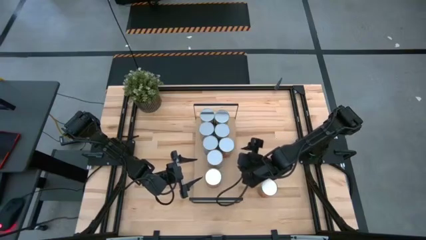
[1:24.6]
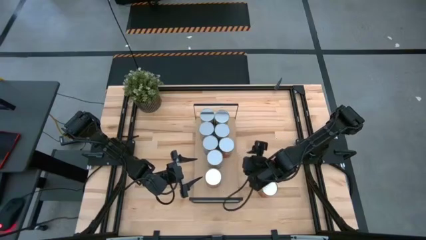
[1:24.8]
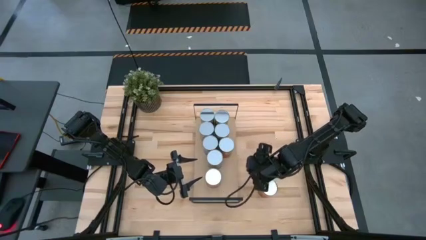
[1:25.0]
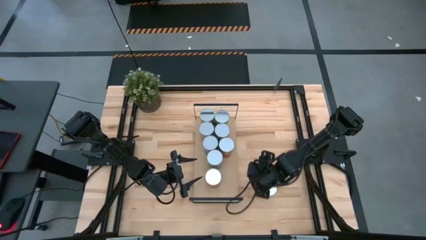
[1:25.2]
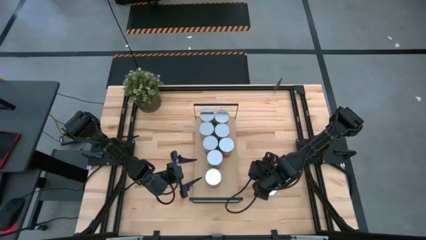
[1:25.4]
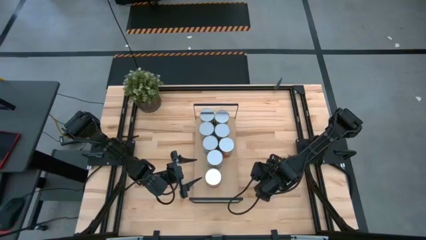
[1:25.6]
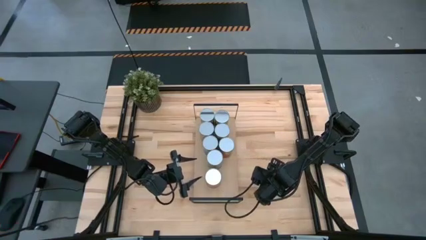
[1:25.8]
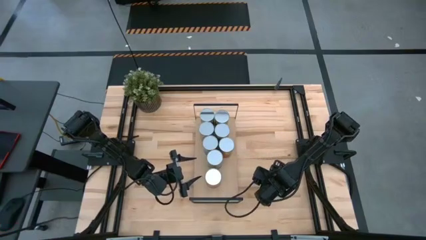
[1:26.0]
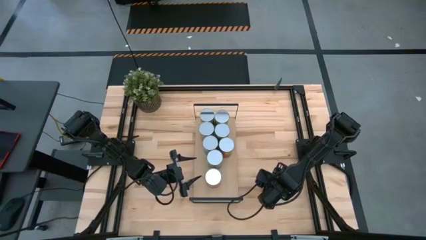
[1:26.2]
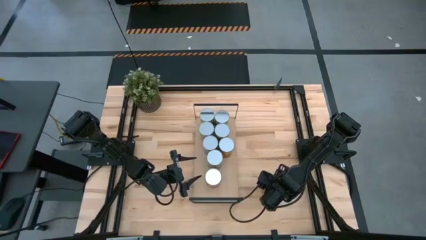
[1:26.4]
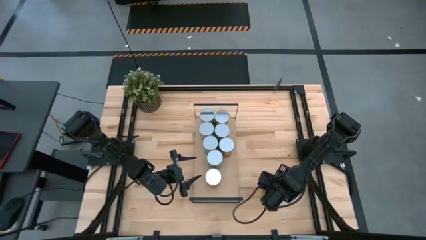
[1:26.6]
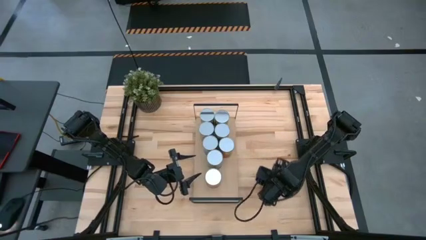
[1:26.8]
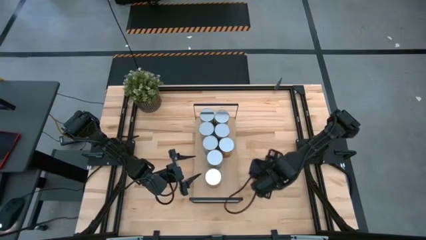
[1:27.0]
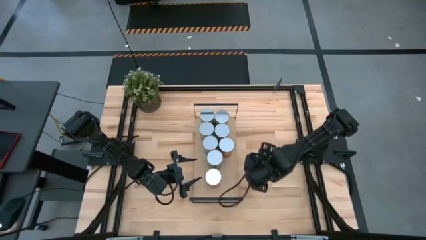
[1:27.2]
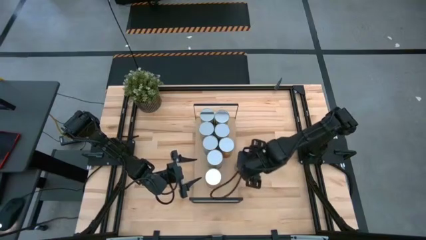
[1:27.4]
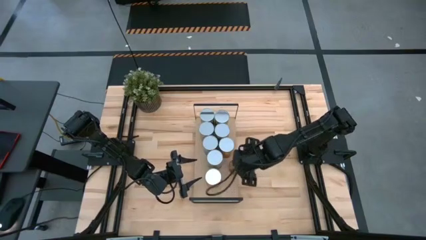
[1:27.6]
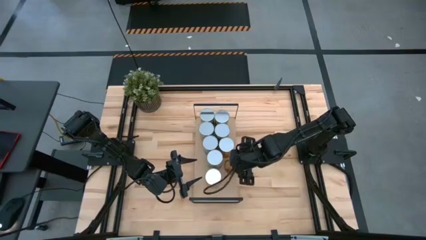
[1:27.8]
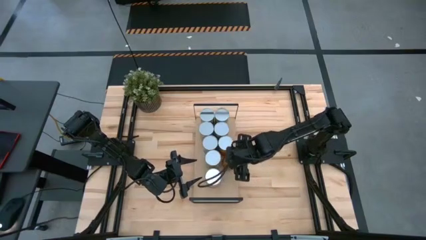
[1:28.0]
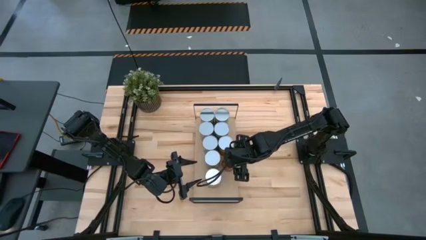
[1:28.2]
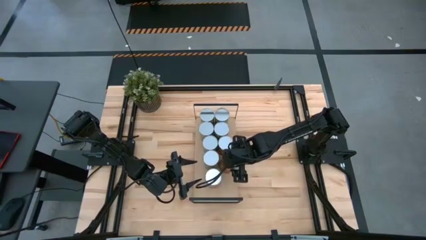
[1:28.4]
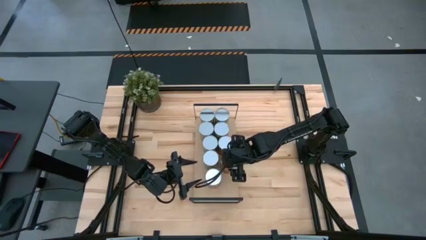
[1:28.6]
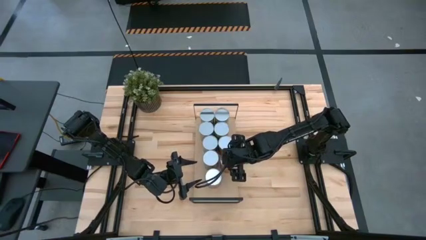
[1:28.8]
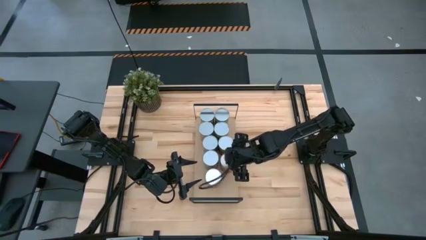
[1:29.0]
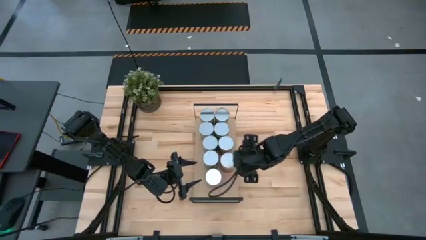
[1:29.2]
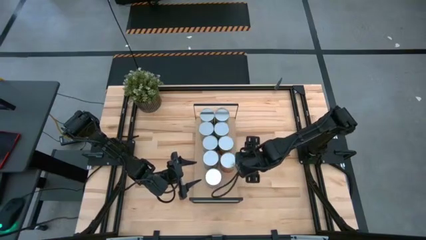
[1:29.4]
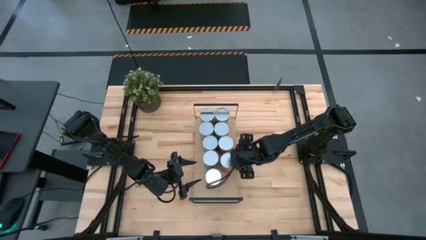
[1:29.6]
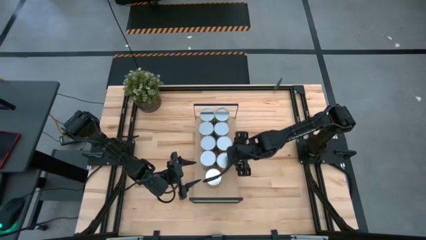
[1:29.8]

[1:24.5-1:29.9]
Task: Pick and place cans onto a shelf
Put the canned pineapple on the shelf

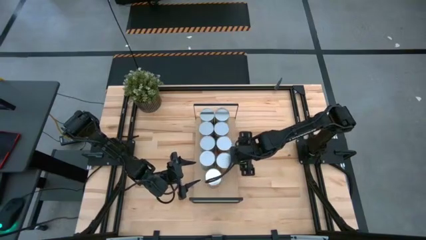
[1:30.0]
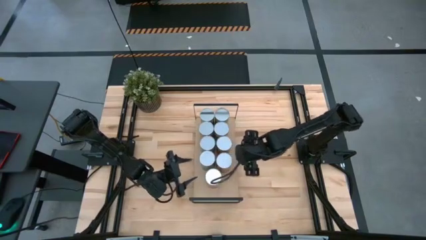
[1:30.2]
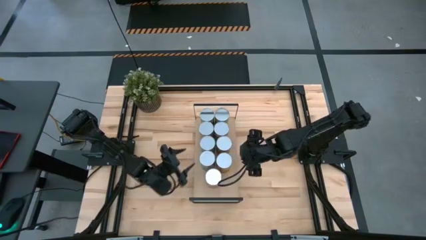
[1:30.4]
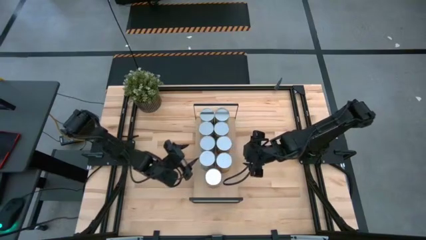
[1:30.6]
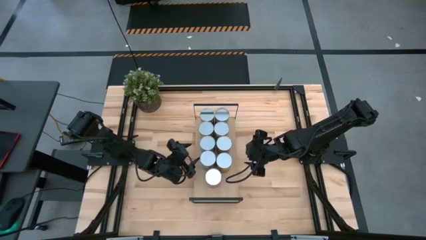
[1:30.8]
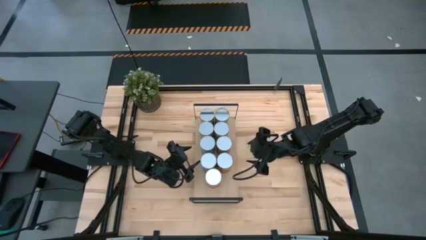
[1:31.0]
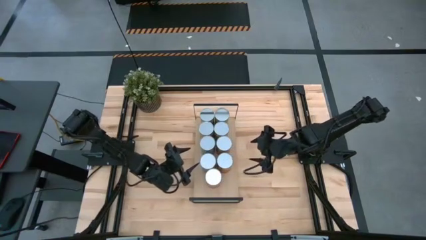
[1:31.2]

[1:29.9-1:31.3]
Adjust the canned tomatoes on the shelf

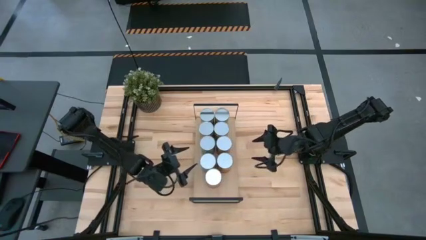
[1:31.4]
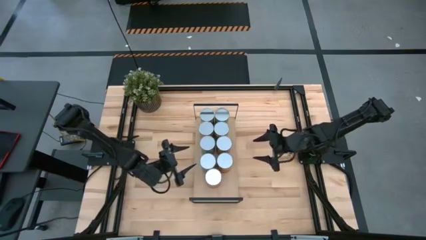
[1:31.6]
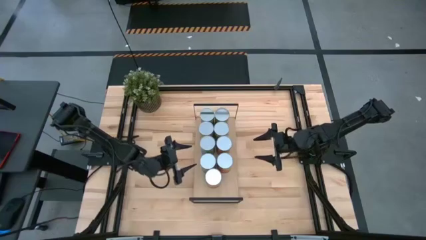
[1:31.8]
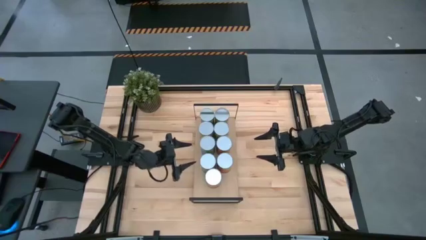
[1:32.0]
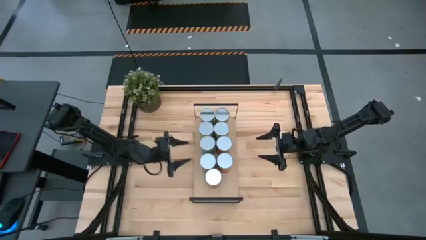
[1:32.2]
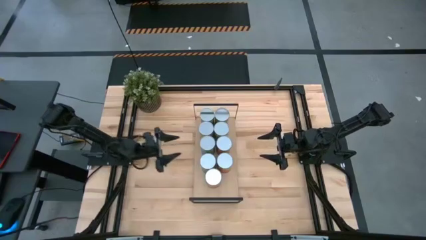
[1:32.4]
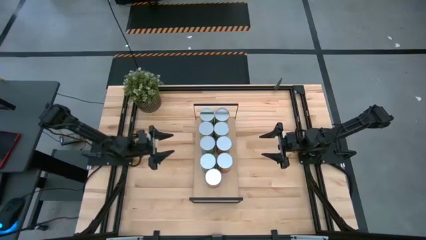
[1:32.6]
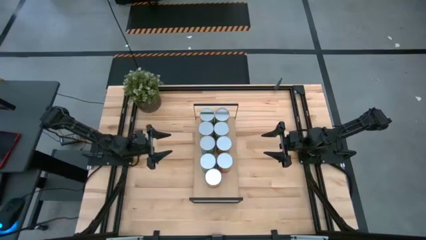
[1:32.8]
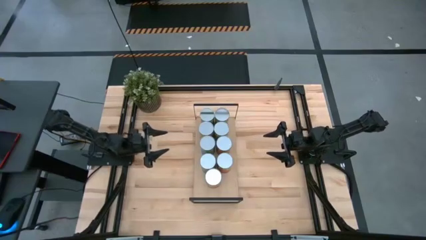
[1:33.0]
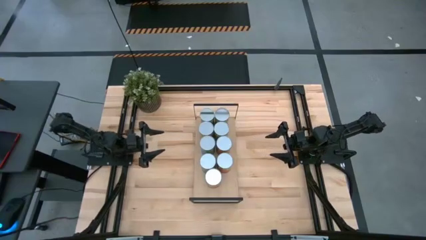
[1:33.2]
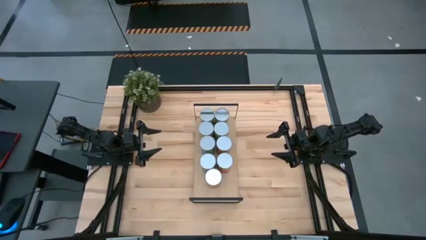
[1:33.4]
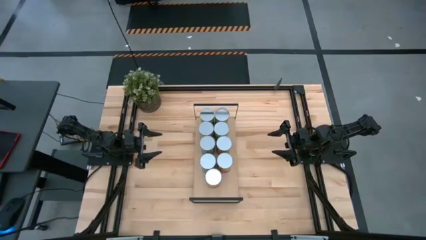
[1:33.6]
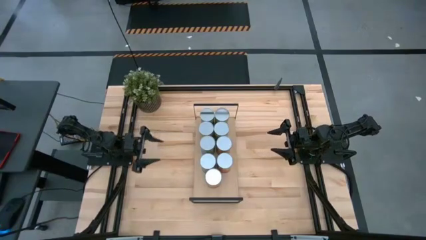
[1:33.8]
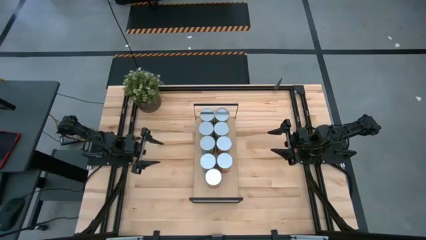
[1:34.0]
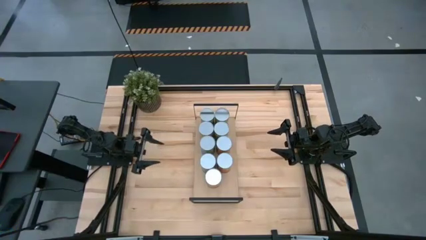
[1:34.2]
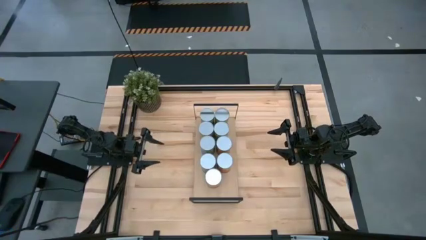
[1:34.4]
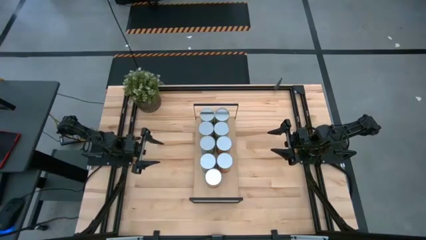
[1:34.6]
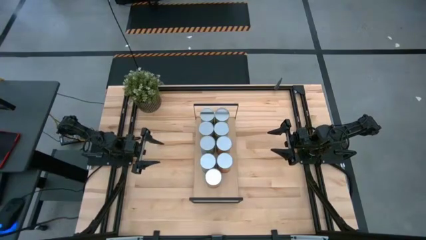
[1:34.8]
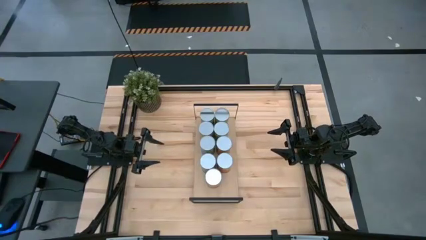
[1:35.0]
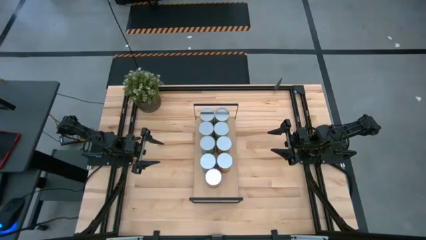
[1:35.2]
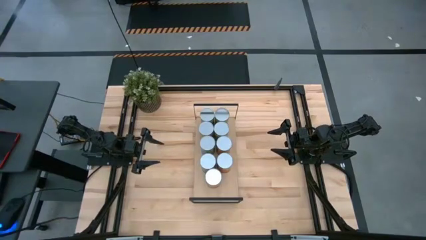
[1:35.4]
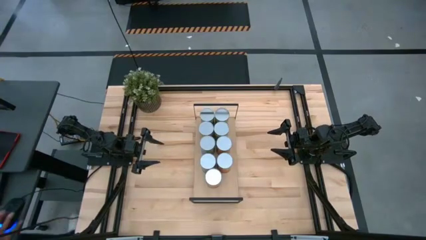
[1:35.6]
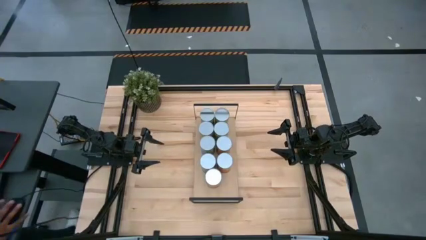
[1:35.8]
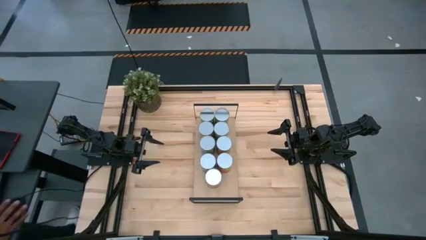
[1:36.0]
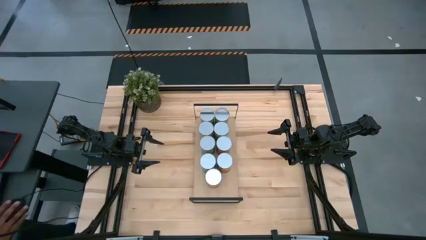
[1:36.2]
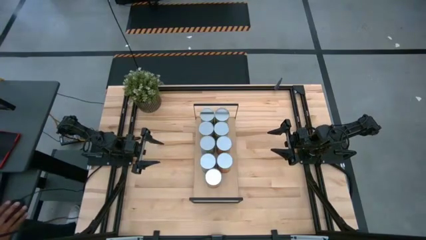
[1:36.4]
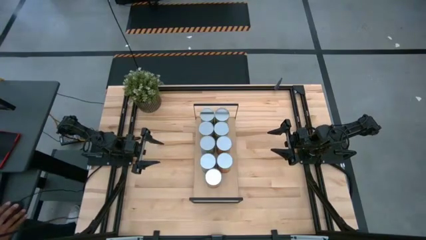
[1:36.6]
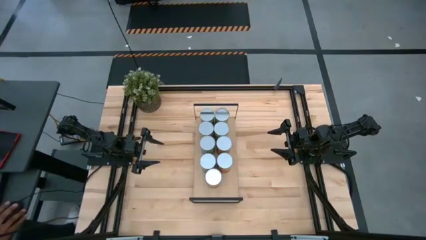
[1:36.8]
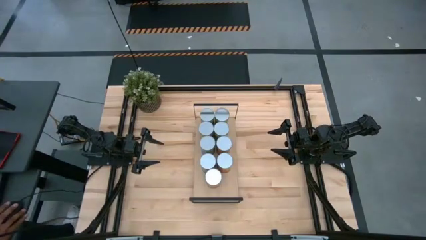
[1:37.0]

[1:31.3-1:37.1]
Return to Home Position

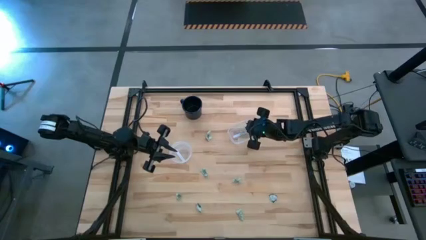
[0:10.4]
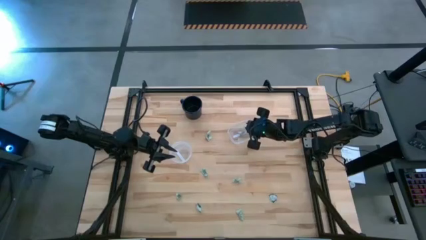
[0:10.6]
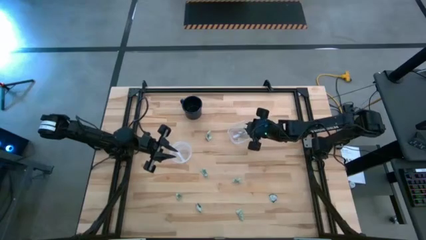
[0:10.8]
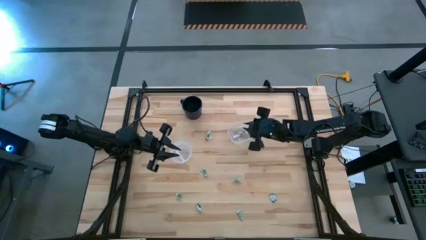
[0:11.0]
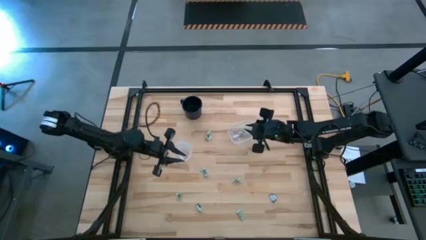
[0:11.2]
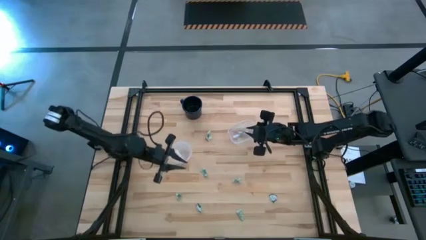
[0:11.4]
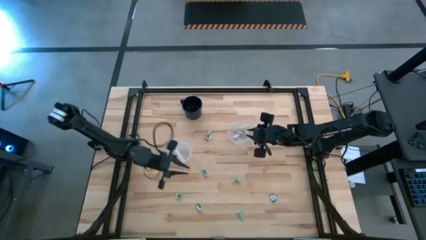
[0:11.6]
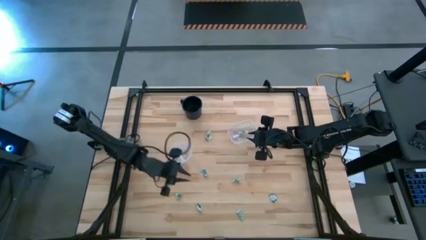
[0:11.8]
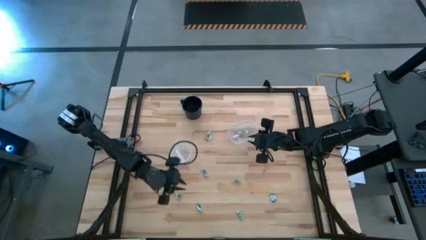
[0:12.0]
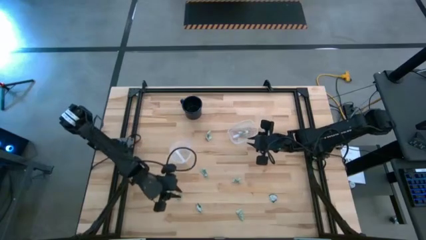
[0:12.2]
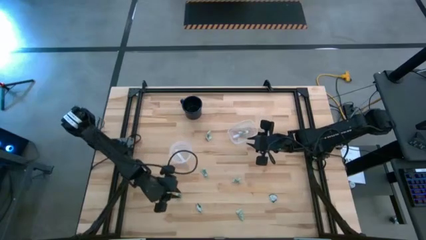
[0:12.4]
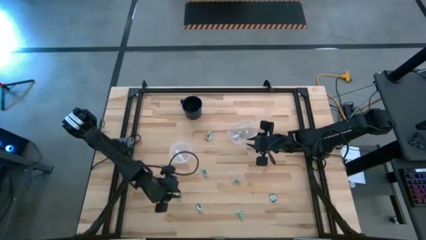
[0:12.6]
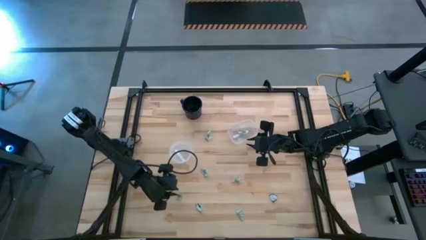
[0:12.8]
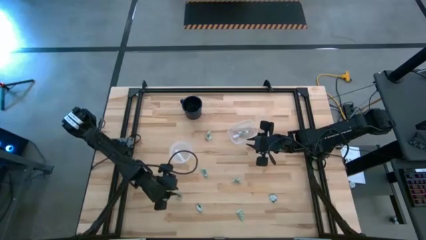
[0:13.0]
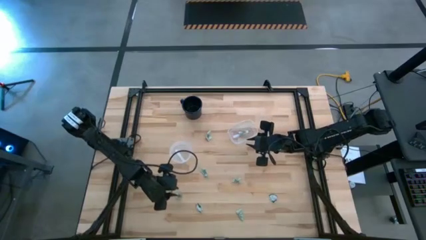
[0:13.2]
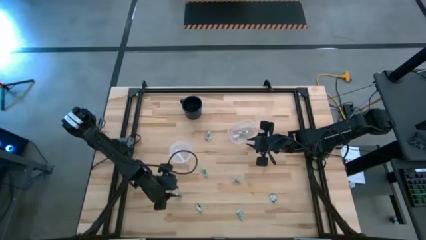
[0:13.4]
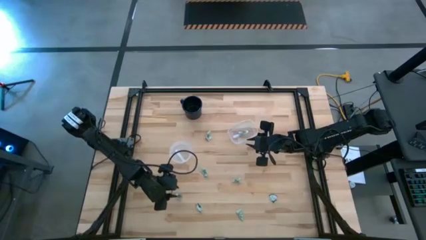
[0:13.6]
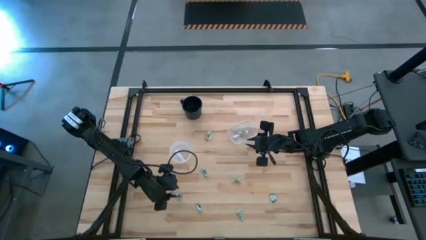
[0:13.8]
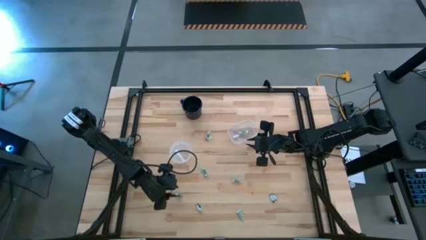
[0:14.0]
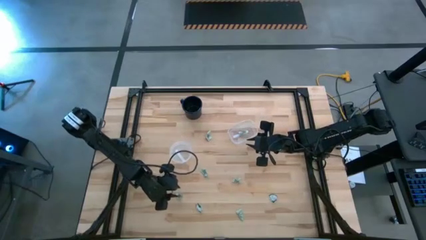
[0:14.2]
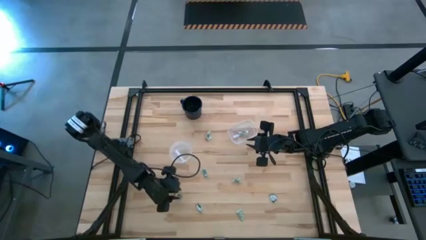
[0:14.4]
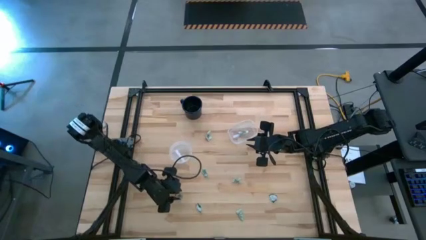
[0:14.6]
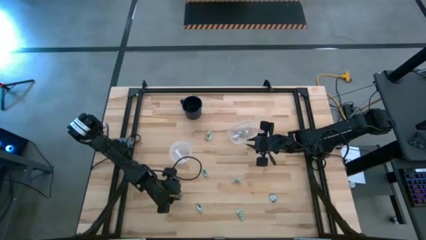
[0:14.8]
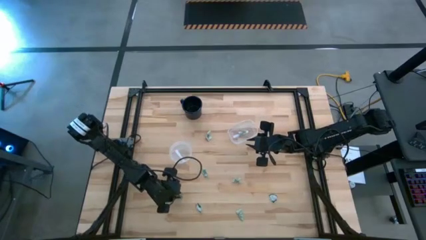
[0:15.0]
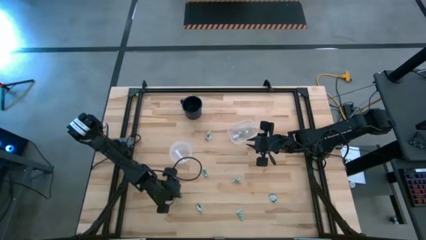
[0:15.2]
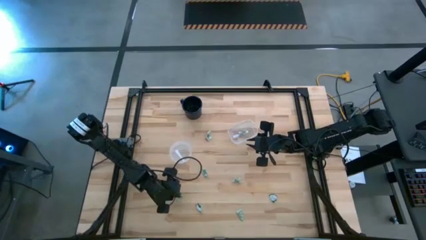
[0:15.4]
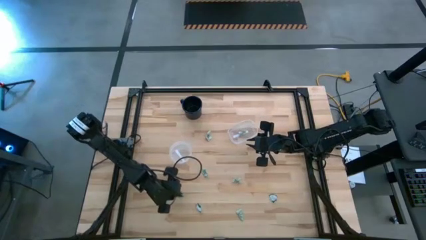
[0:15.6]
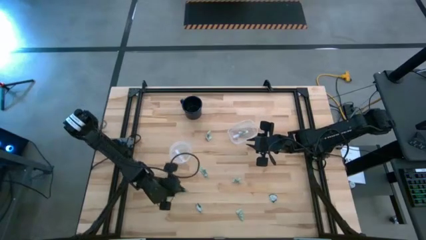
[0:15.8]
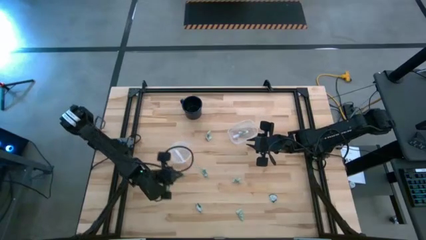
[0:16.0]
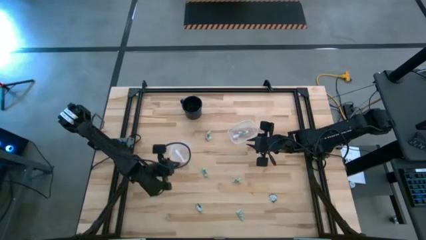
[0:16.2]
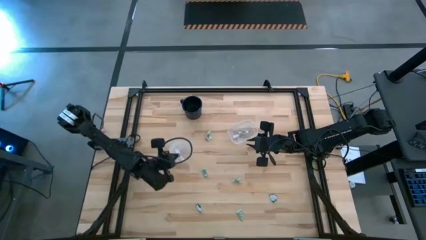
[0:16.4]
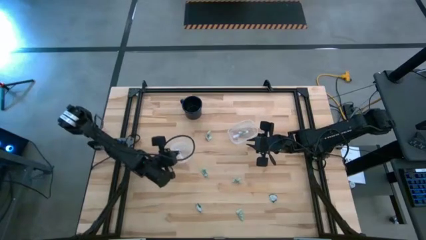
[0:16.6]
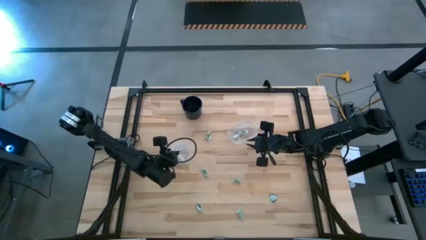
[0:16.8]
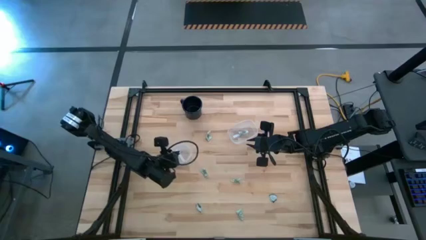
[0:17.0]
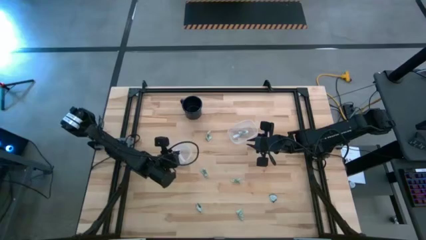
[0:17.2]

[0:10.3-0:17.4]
Task: Pick and place items into bin
Put the stevia packet into the circle transparent bin
